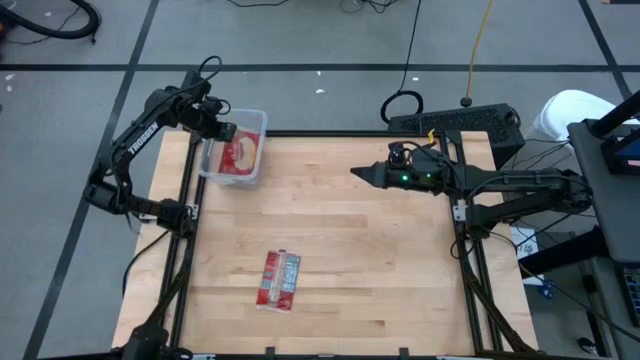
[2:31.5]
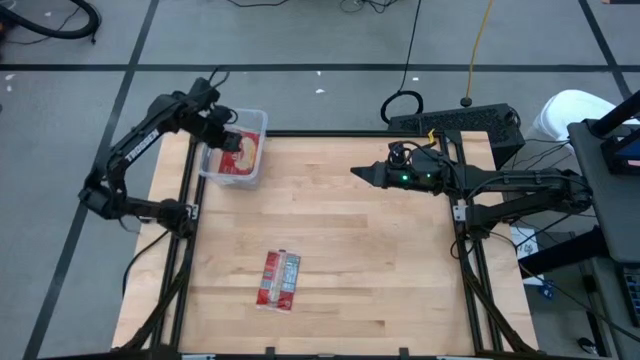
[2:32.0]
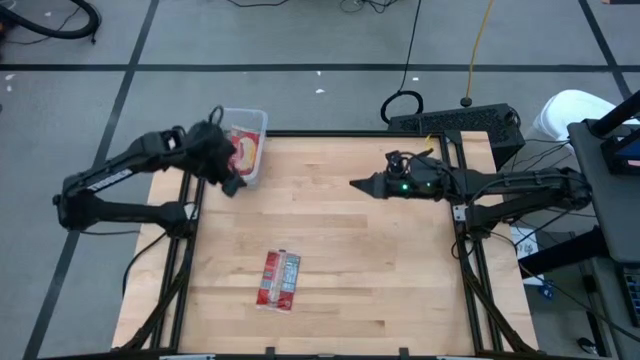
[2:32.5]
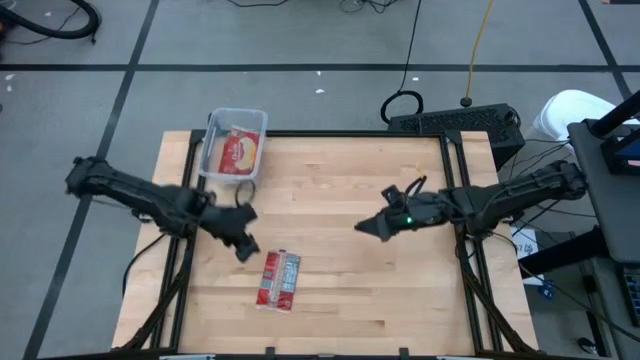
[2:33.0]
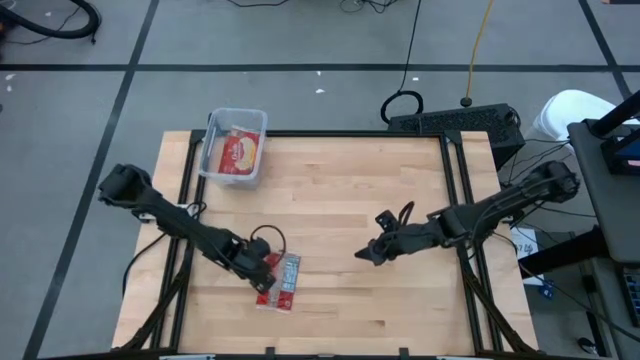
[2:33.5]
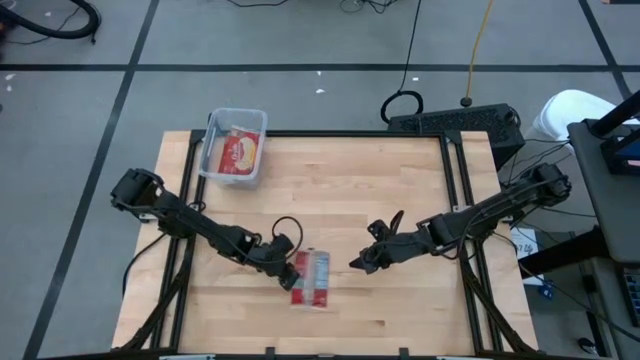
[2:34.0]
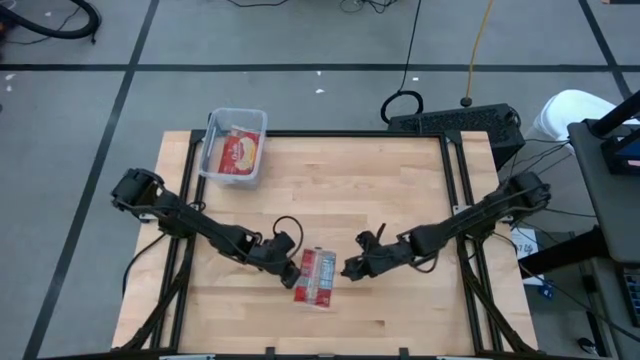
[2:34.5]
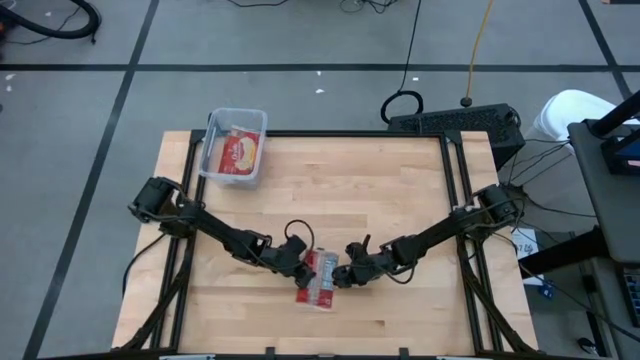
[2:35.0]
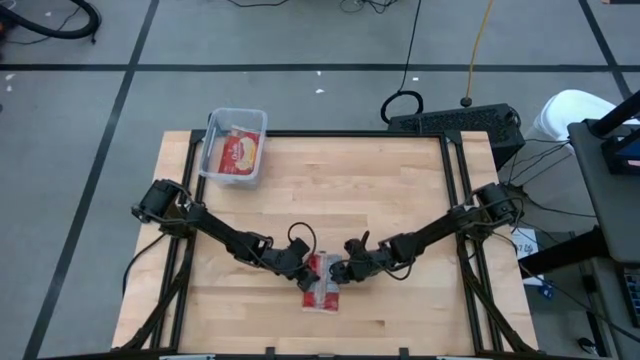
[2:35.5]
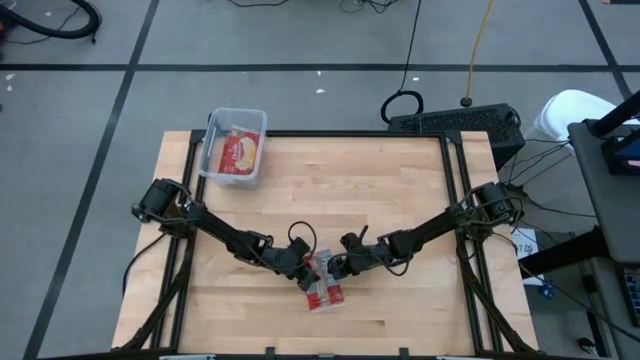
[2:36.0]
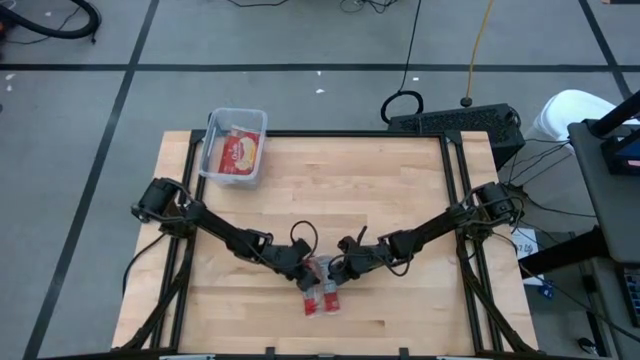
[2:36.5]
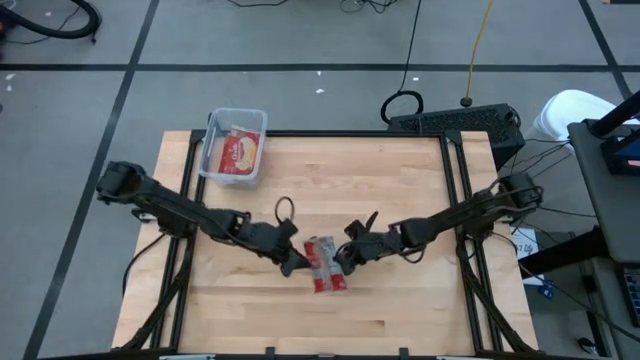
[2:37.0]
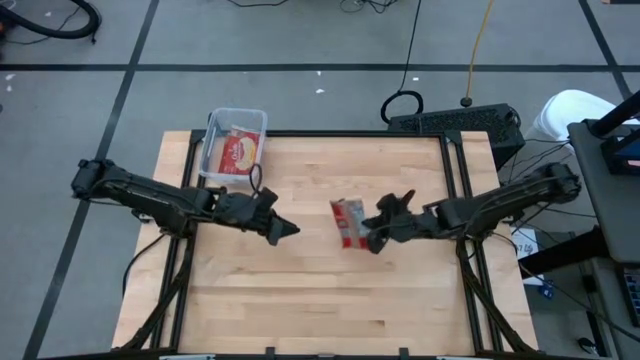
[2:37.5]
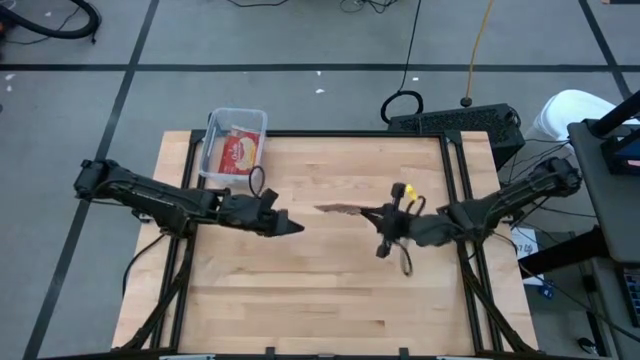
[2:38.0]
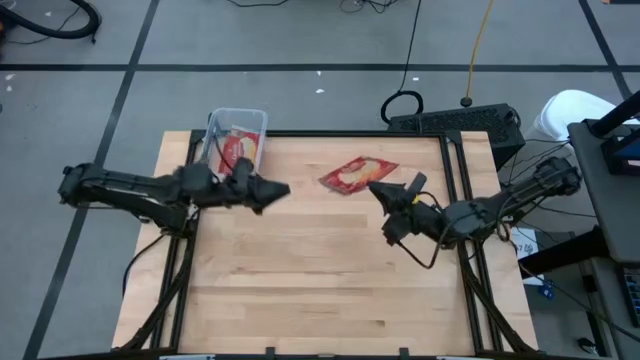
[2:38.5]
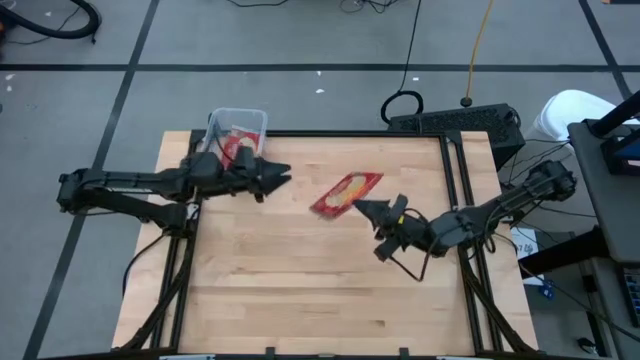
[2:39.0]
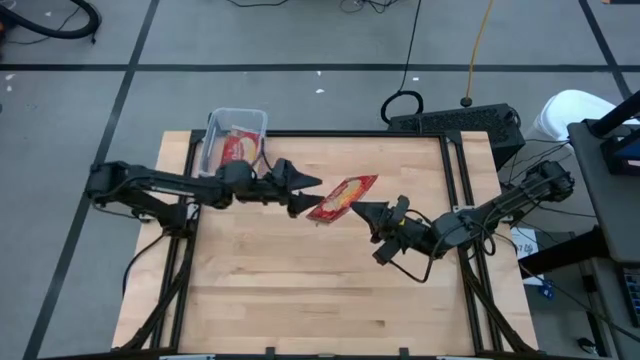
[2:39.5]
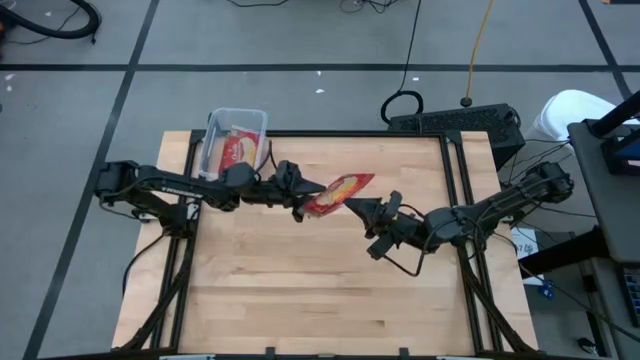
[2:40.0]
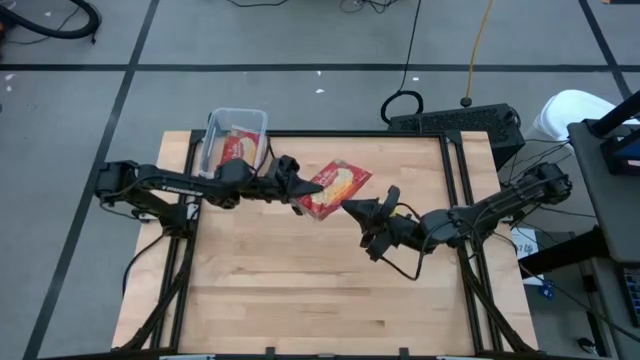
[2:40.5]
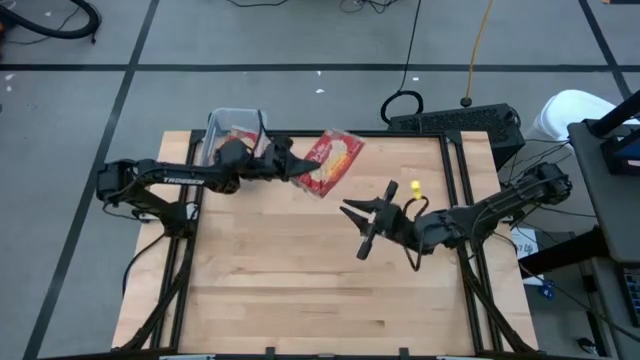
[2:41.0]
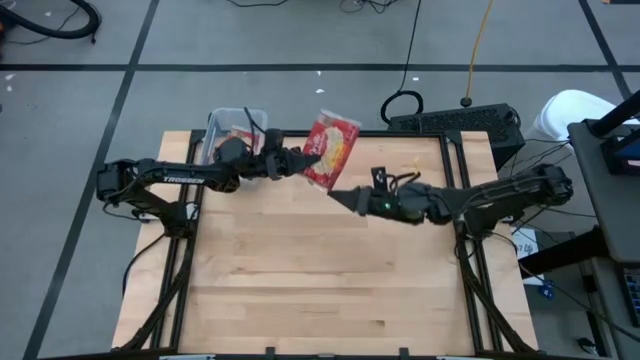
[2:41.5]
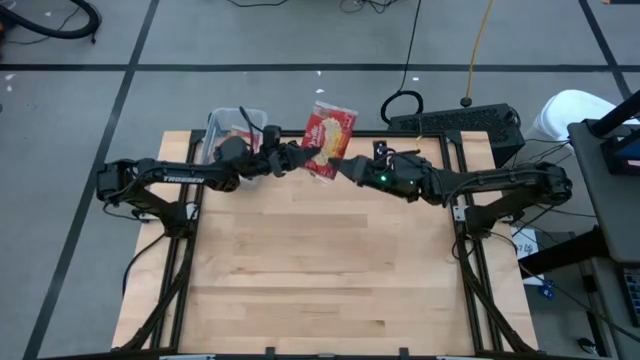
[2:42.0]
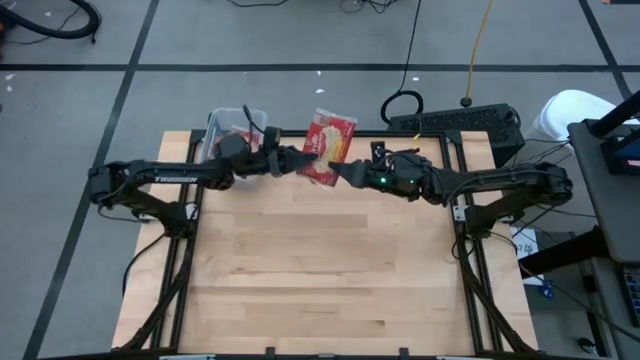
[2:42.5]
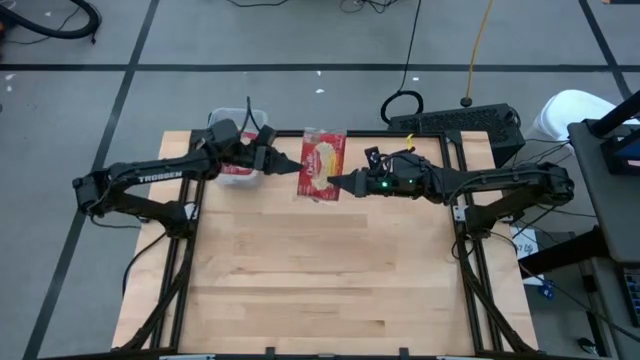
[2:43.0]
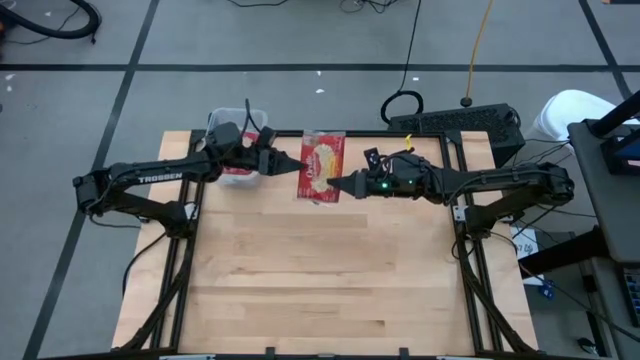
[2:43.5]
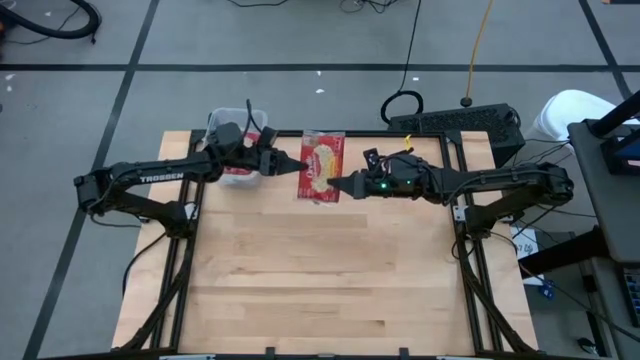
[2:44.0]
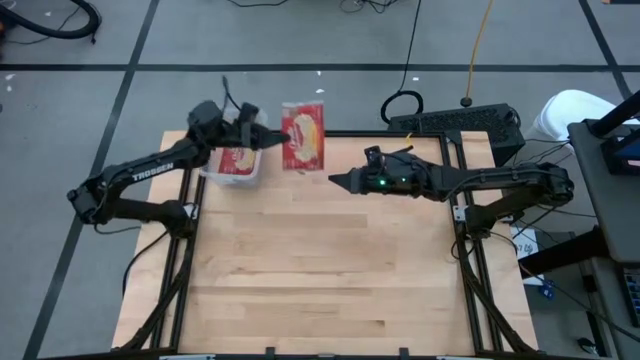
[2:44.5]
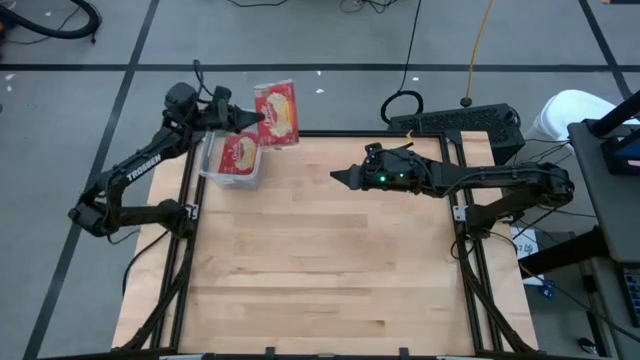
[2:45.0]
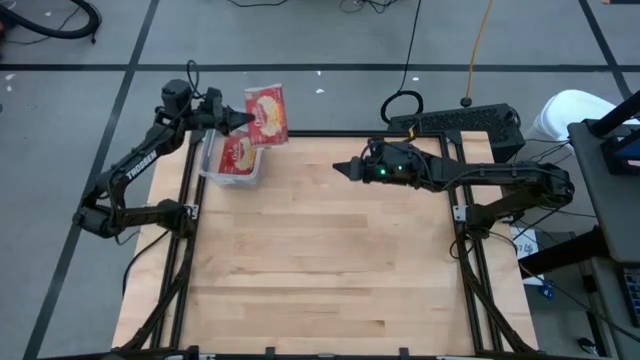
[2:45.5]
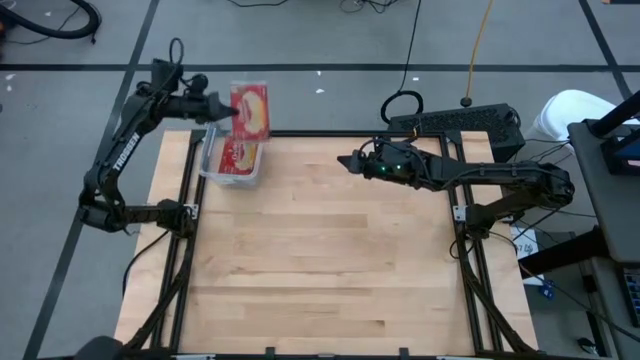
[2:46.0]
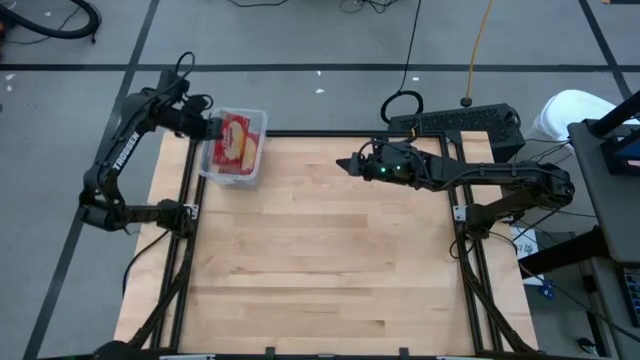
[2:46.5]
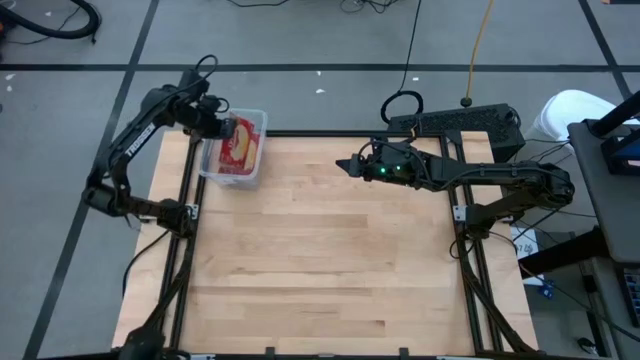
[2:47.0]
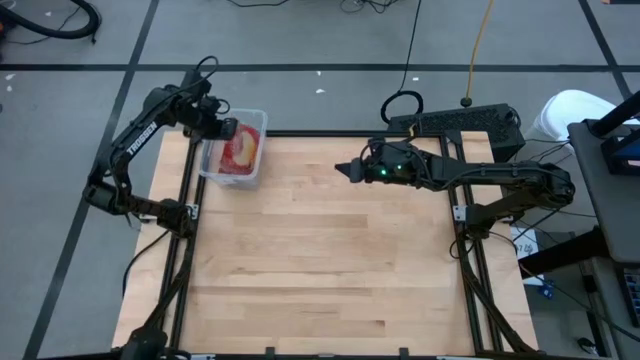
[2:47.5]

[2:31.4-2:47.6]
Task: Sort popcorn bags into baskets
Put the red popcorn bag into the transparent container

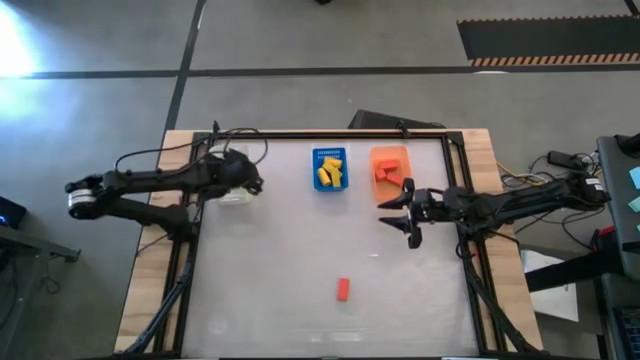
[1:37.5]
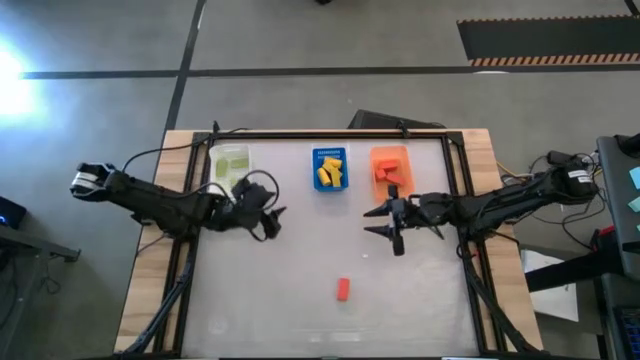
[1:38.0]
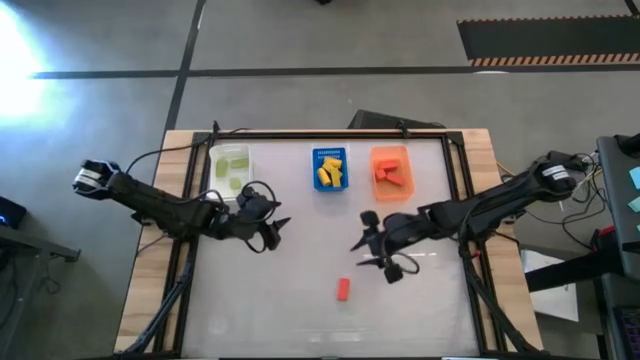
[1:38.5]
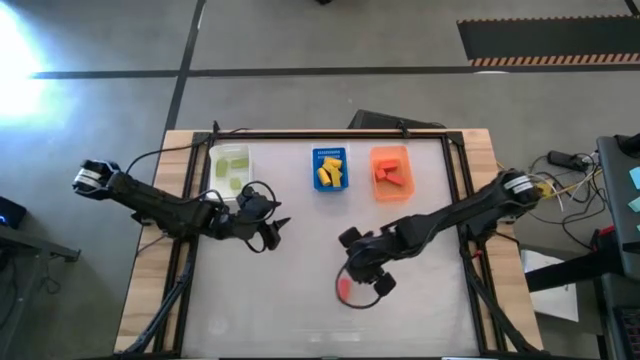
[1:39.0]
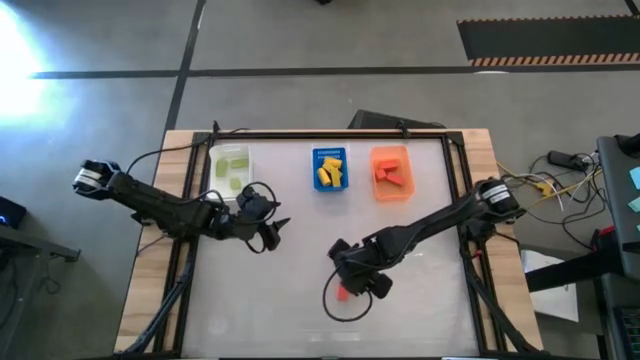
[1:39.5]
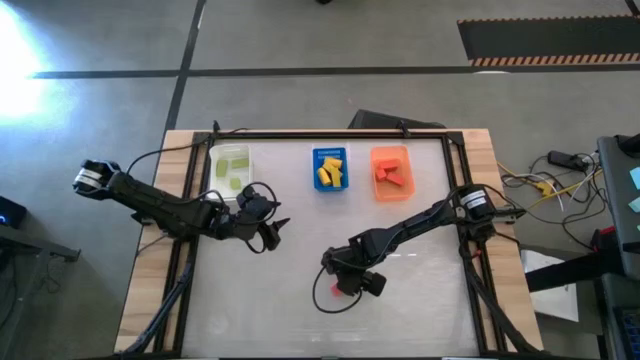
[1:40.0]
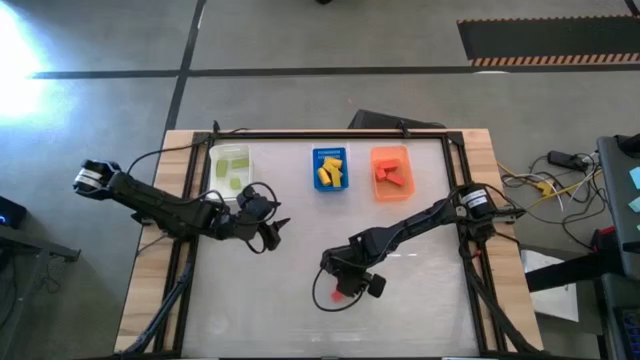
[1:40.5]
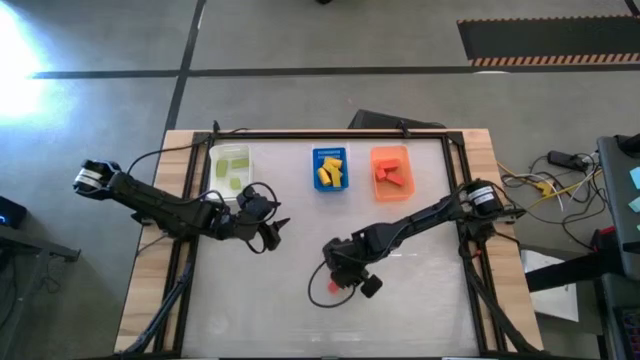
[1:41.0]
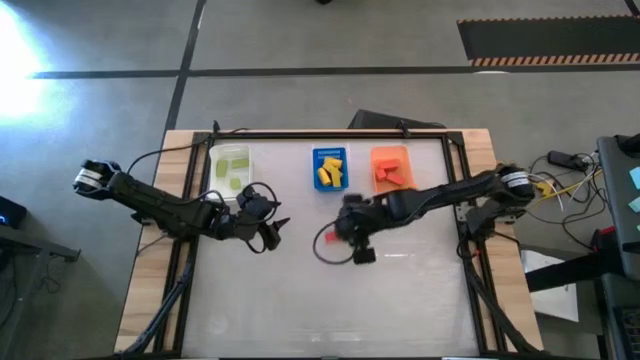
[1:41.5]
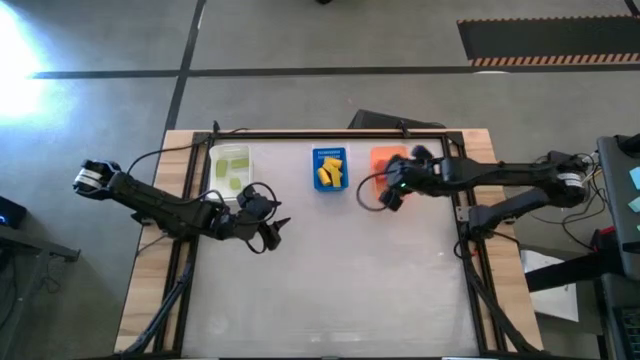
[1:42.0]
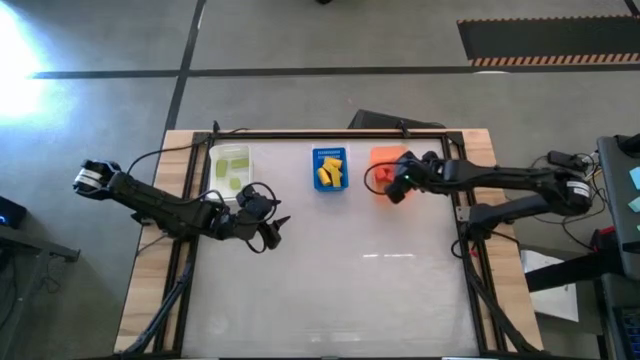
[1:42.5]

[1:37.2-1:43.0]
Task: Sort & place blocks by color
Put the orange block into the orange bin
